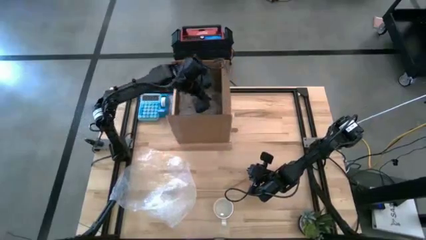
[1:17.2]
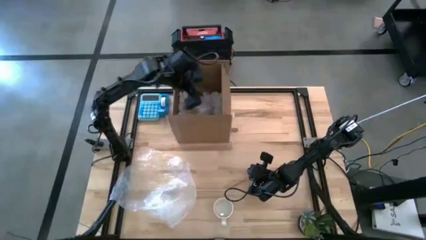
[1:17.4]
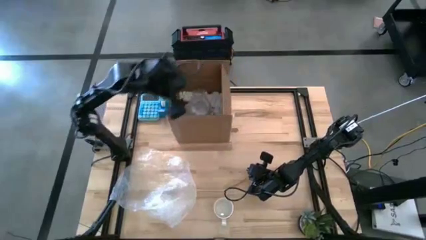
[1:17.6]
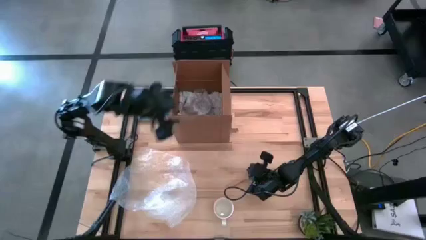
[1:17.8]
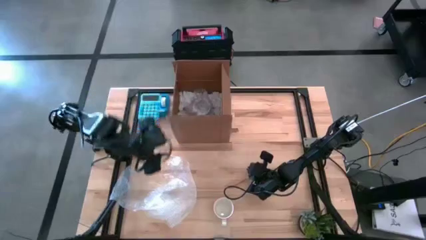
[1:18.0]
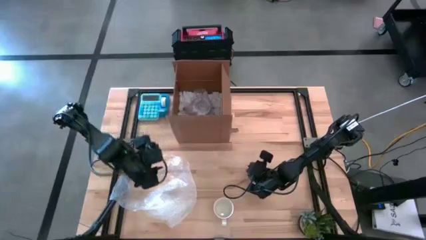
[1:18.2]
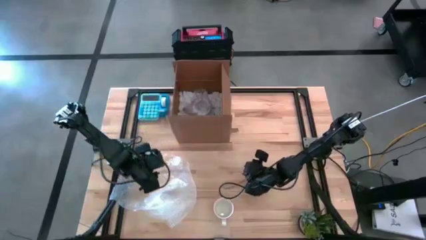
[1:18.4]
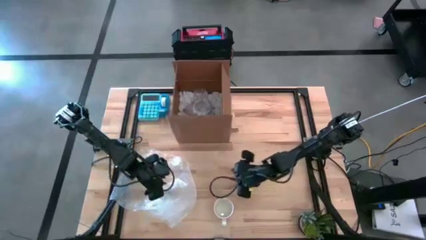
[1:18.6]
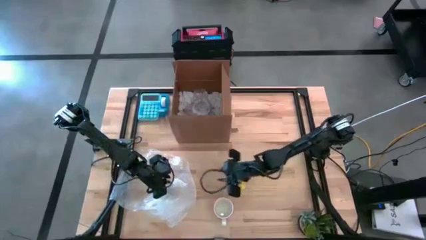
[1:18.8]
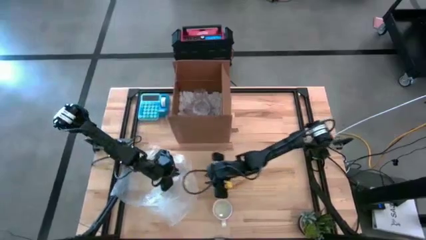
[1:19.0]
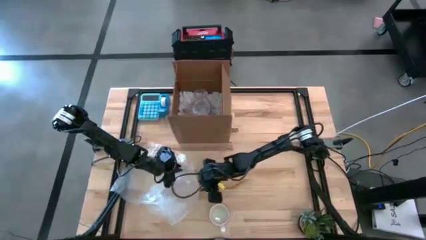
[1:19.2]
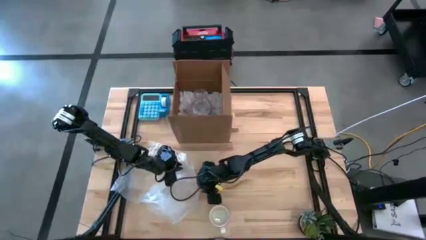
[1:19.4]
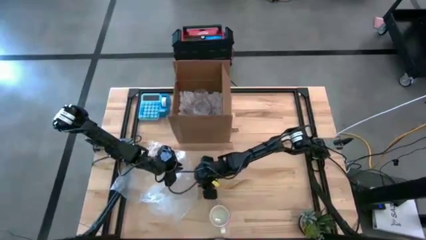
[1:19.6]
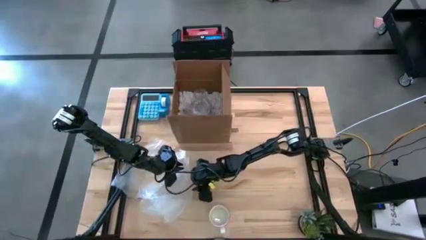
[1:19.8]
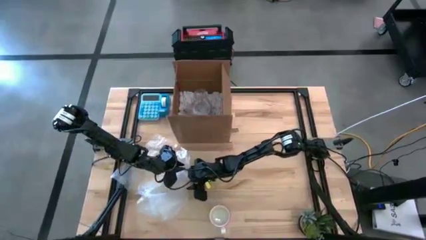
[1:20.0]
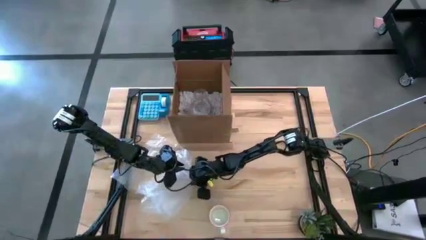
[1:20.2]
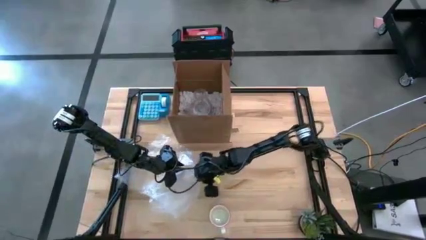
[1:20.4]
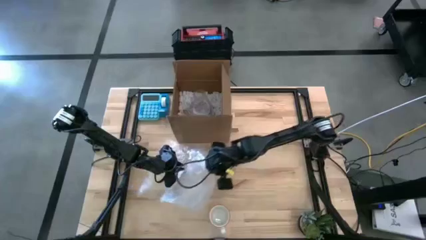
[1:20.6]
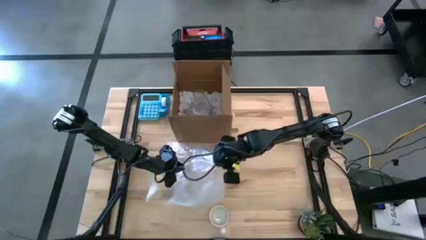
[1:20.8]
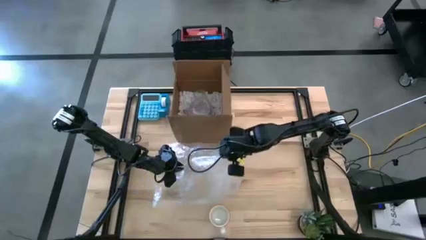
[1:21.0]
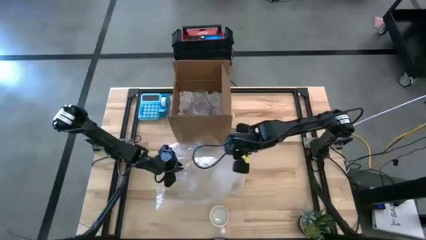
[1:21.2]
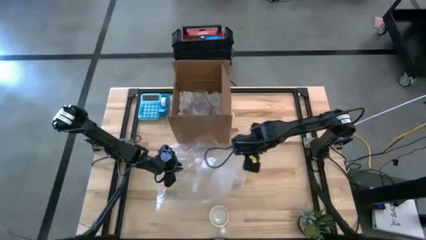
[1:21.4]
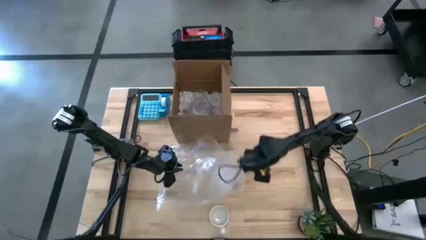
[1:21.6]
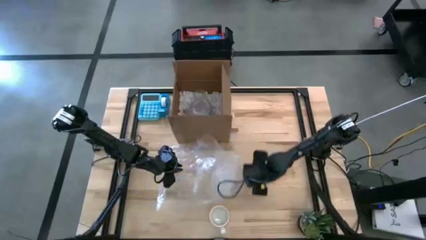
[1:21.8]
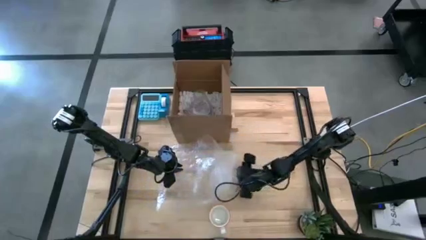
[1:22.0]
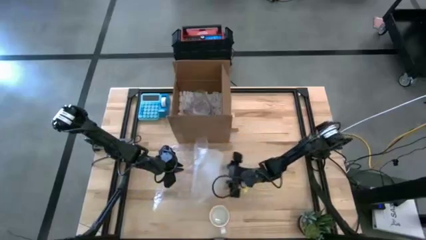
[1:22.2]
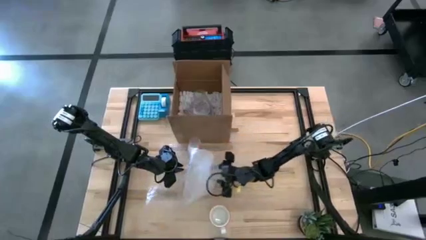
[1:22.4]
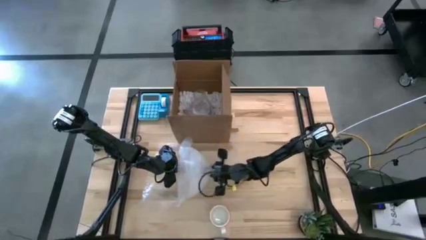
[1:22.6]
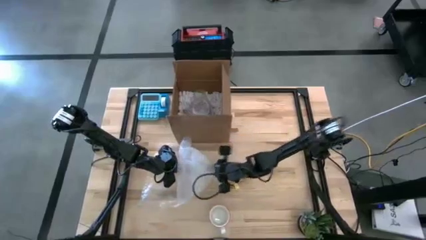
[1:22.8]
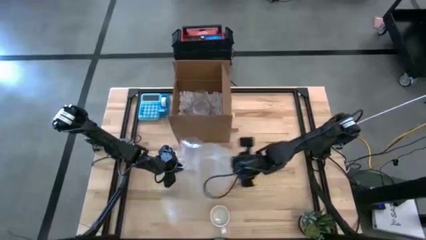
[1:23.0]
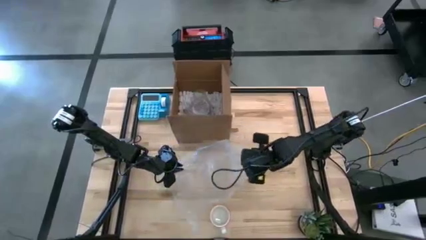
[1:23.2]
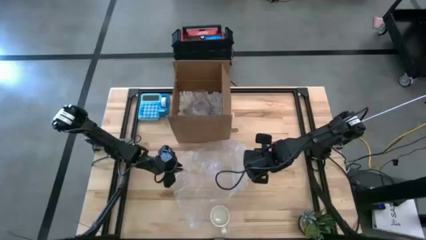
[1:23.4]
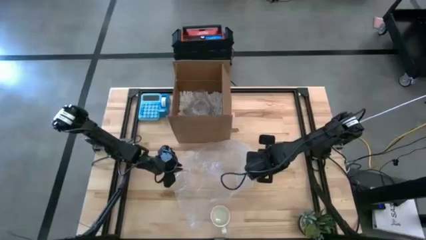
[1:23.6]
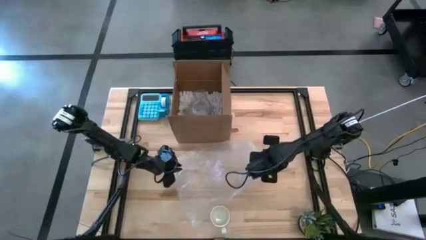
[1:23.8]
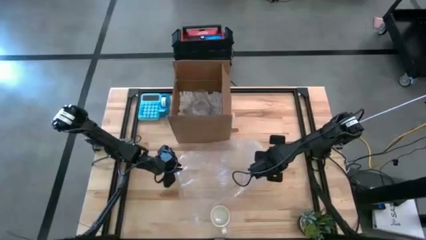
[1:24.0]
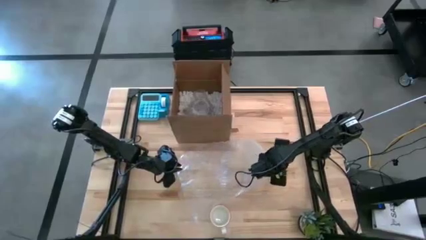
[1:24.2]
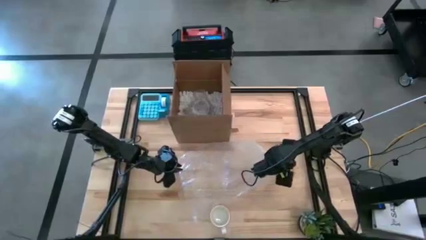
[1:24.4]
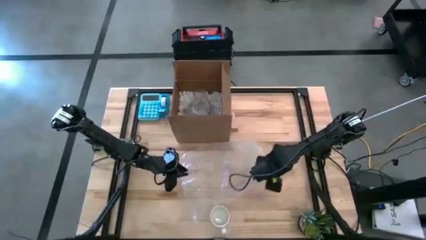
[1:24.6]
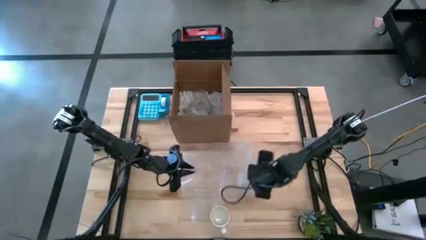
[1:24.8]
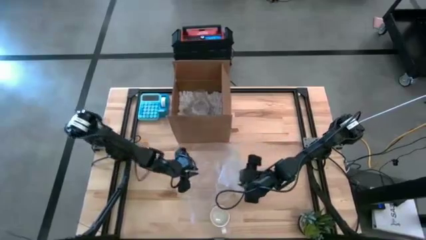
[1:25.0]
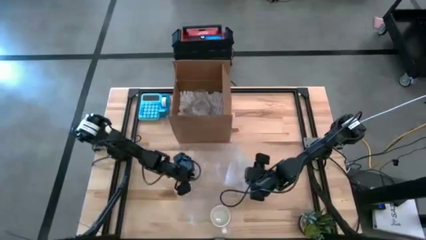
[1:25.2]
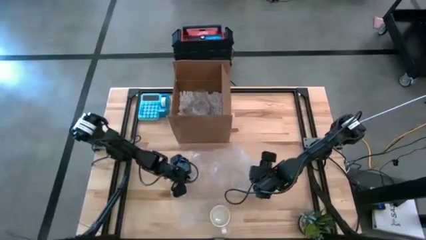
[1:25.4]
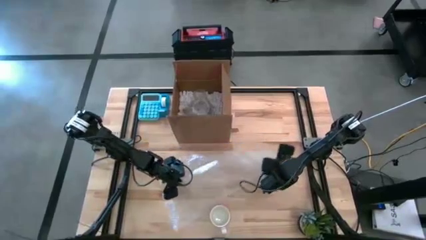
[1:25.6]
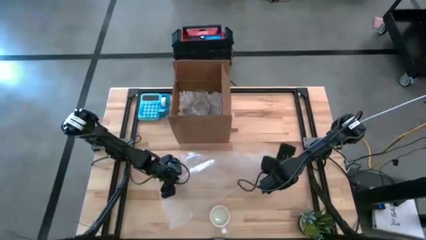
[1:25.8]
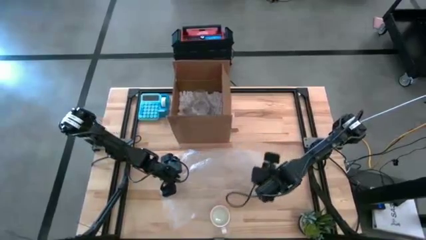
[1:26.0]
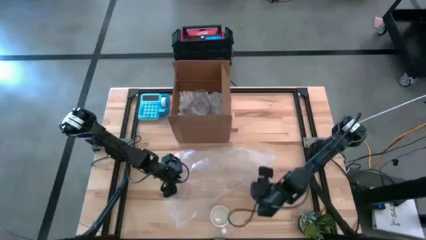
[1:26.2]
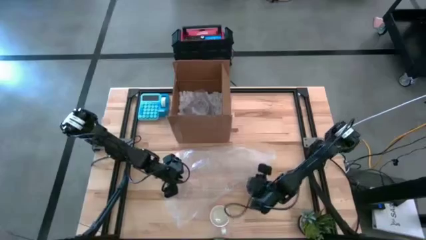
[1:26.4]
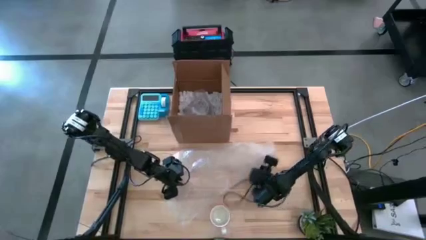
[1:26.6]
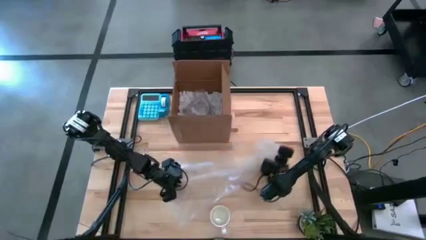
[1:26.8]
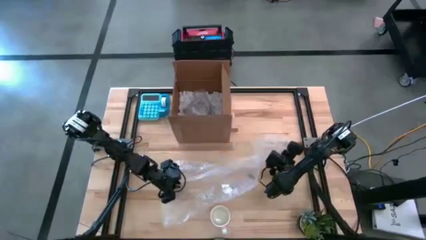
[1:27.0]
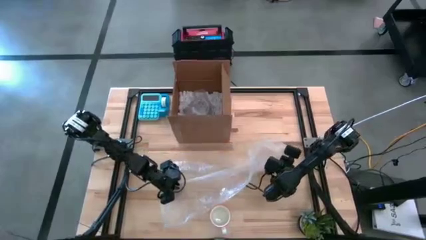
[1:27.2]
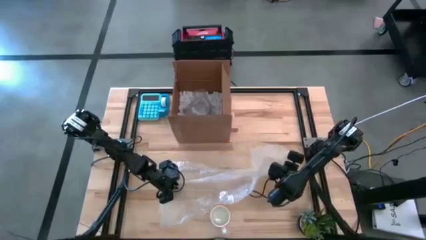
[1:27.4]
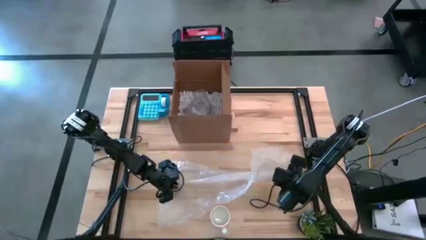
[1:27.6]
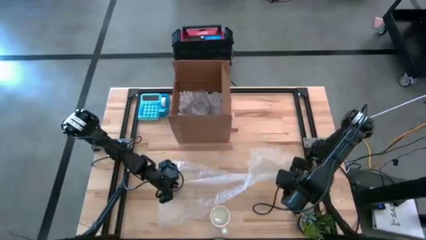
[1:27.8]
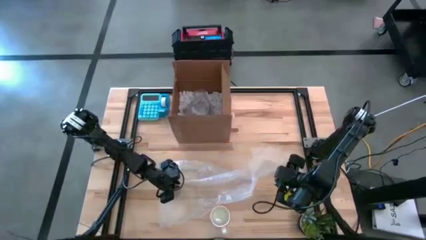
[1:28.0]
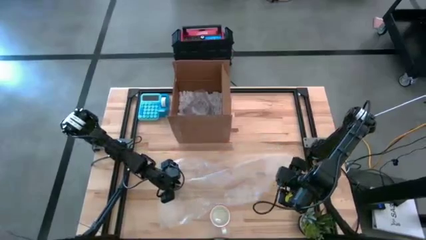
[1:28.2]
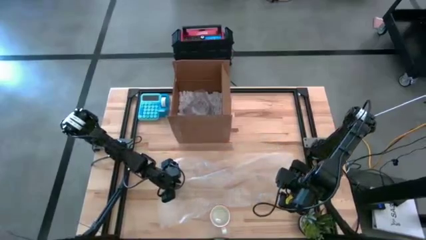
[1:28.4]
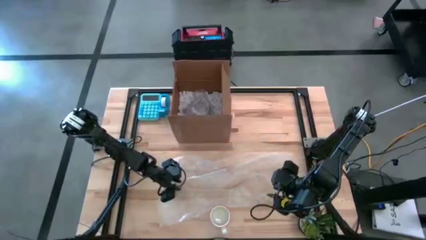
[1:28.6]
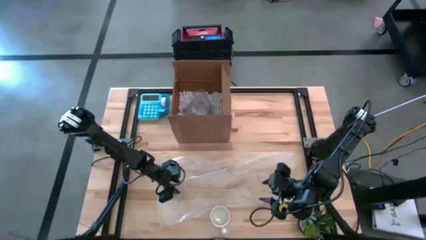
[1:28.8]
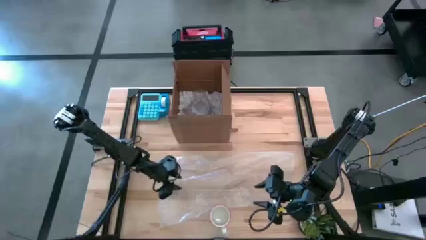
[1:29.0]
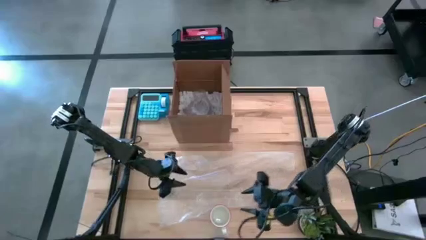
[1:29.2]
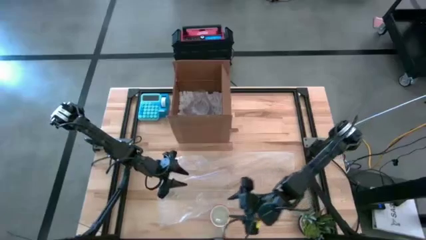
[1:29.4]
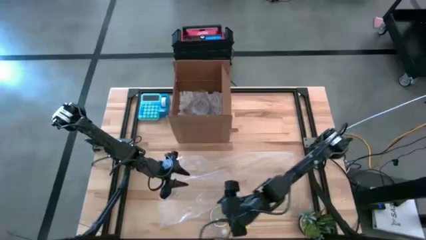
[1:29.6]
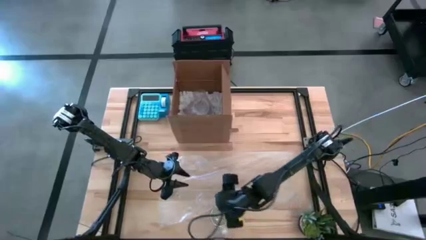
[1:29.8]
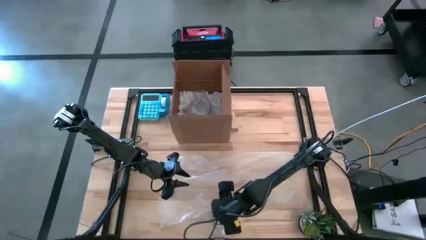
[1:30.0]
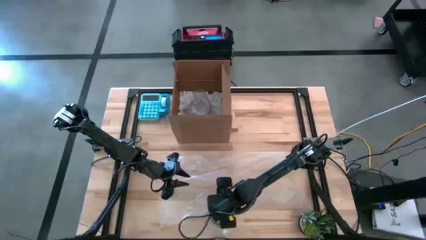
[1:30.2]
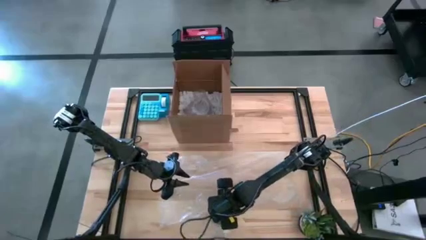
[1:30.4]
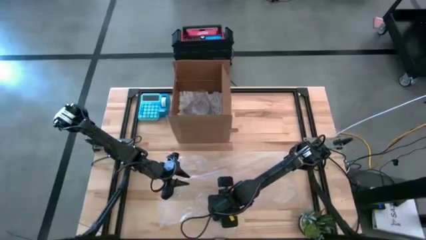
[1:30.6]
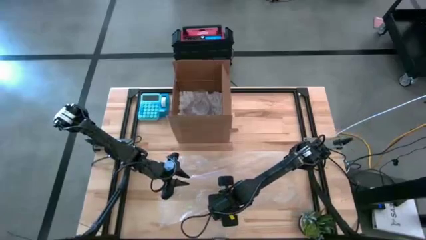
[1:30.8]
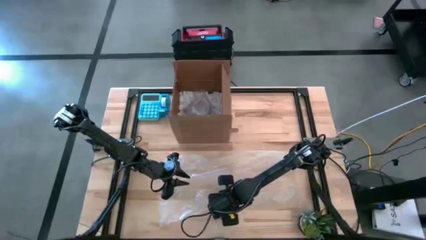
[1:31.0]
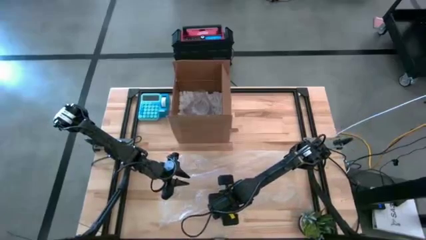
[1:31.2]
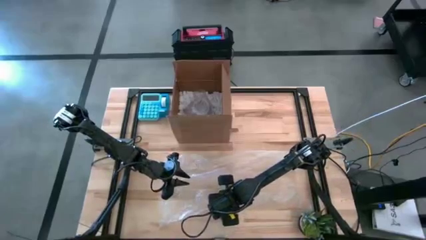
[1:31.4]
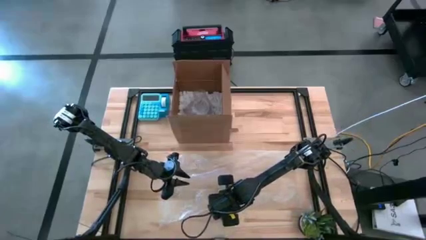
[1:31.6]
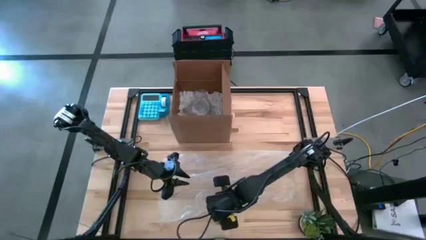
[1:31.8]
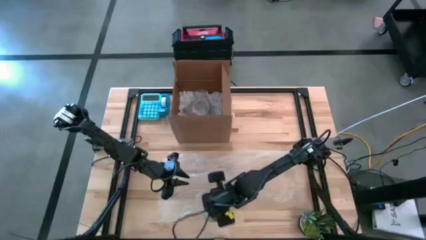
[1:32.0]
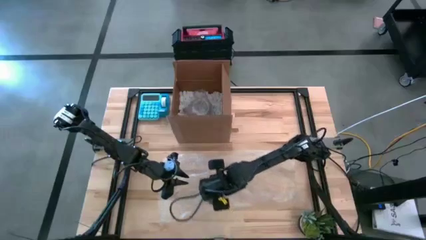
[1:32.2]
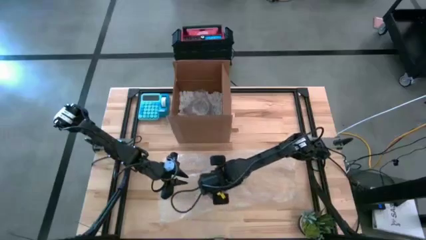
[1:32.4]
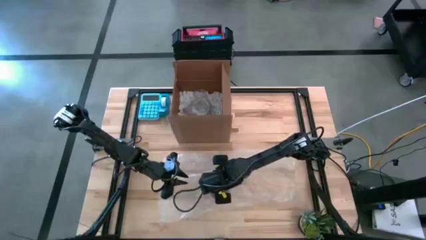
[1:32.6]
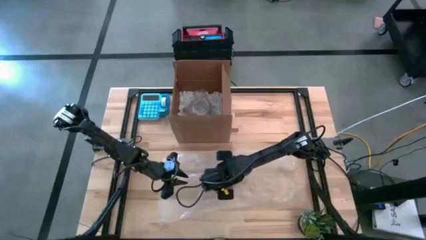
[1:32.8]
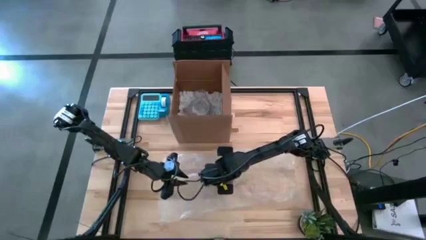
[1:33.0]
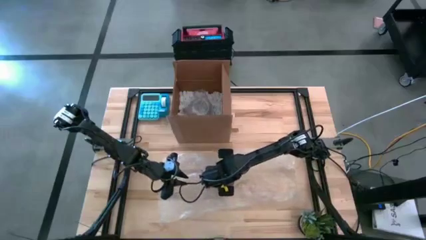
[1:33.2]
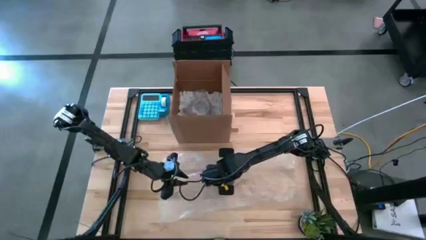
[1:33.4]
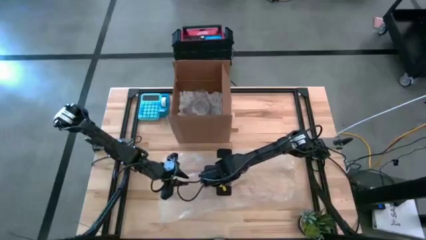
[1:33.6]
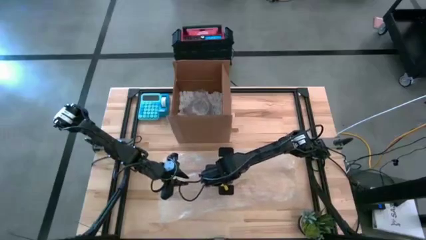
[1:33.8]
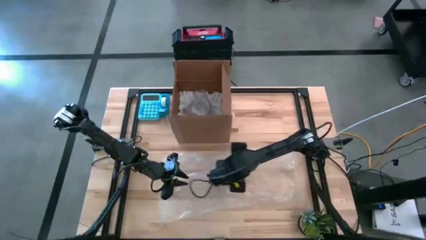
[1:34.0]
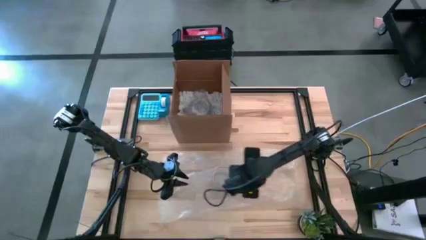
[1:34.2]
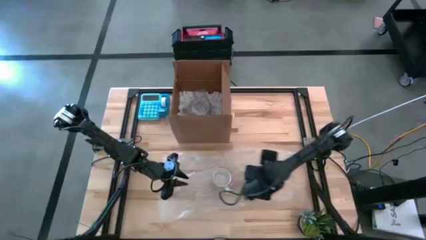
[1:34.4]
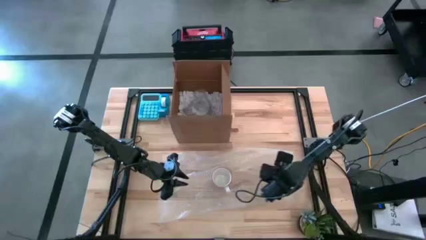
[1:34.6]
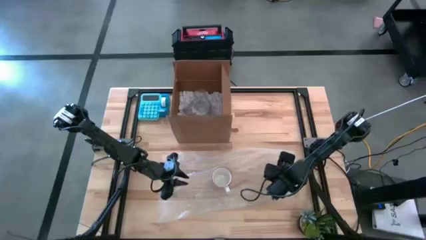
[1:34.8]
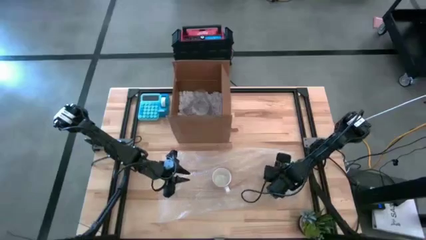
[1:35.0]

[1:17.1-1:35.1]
Task: wrap mug
Wrap the white mug using the bubble wrap
